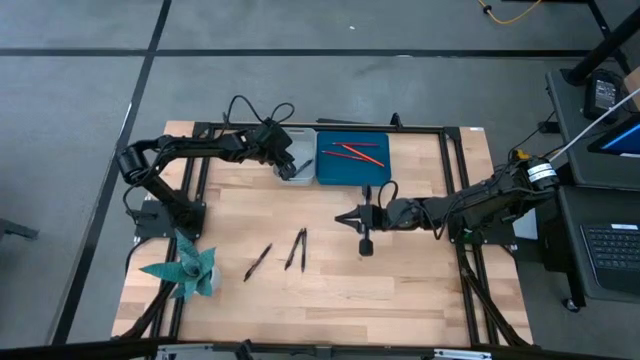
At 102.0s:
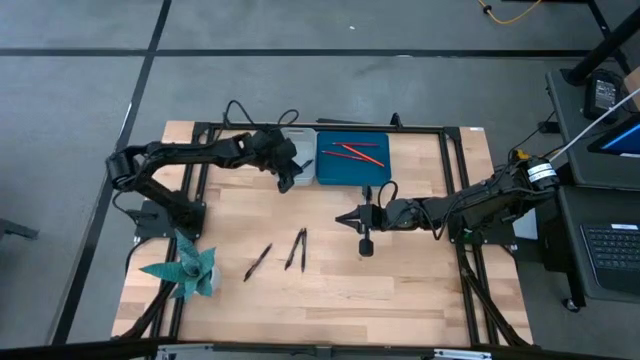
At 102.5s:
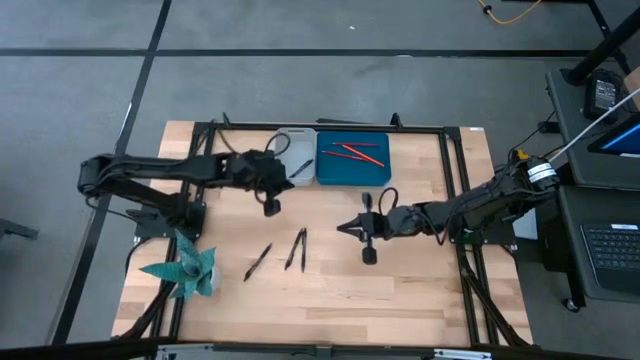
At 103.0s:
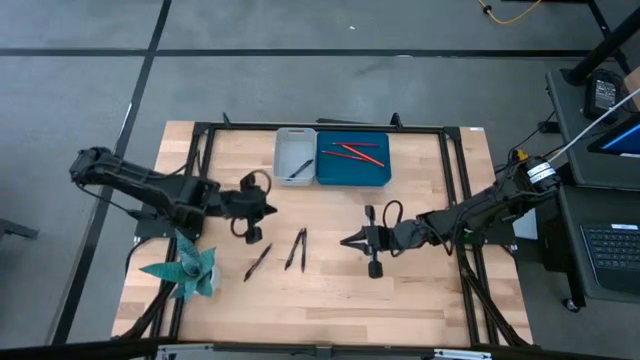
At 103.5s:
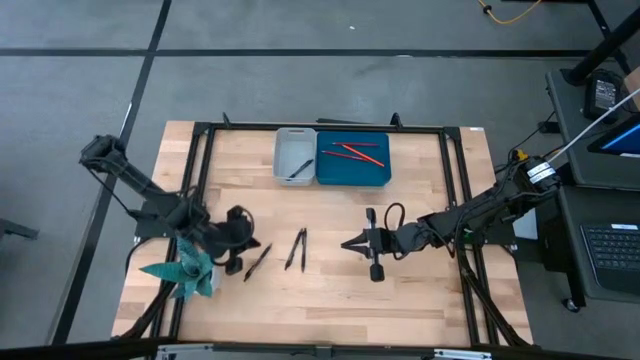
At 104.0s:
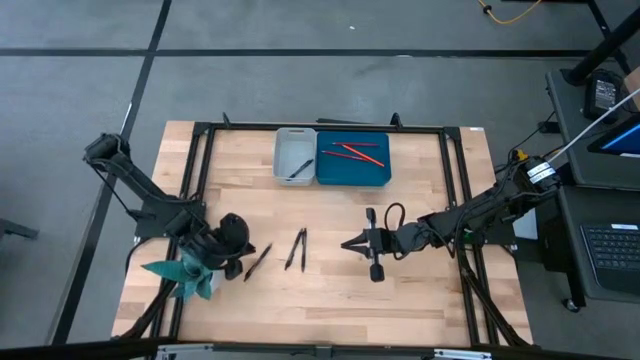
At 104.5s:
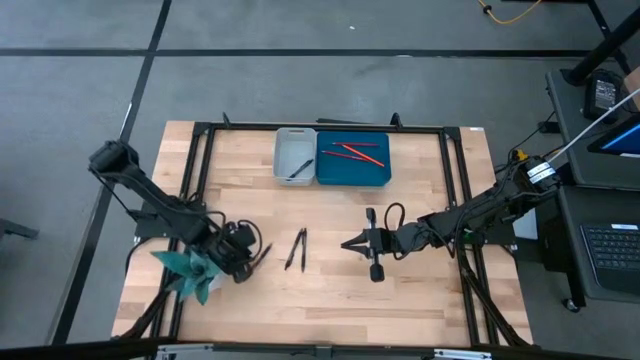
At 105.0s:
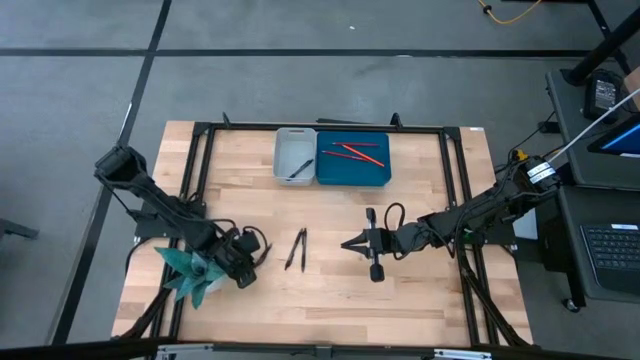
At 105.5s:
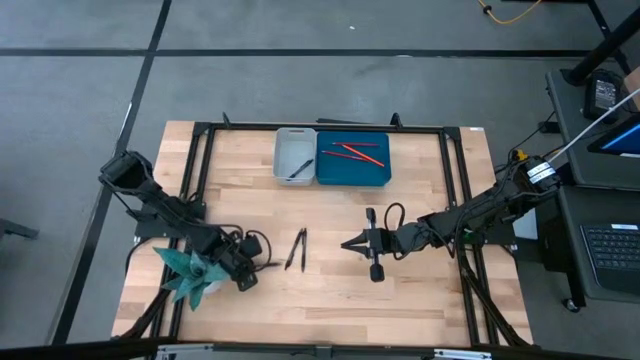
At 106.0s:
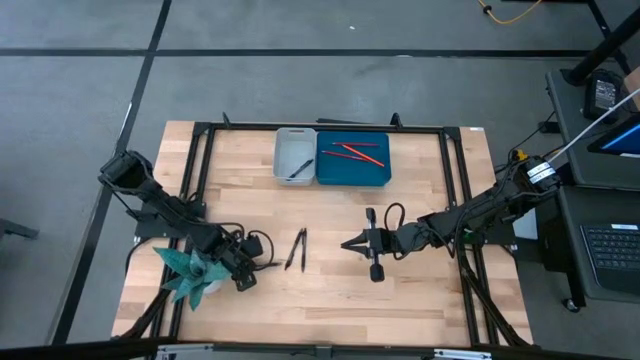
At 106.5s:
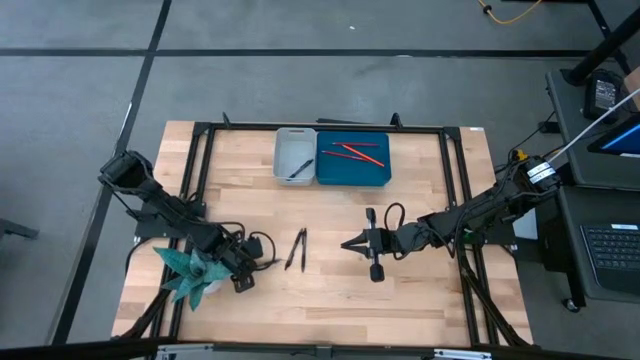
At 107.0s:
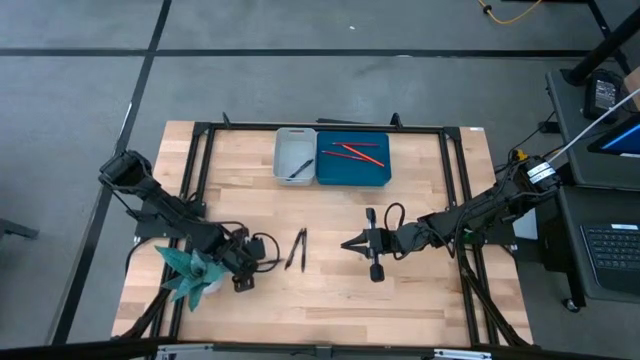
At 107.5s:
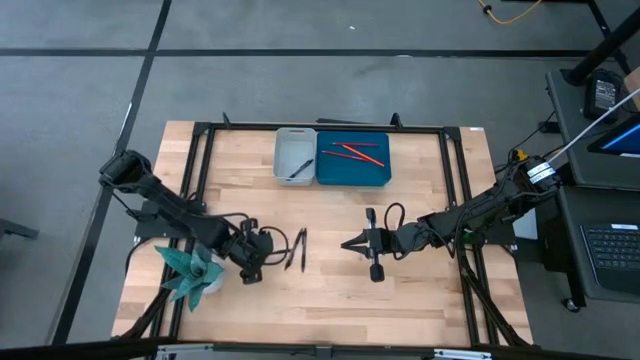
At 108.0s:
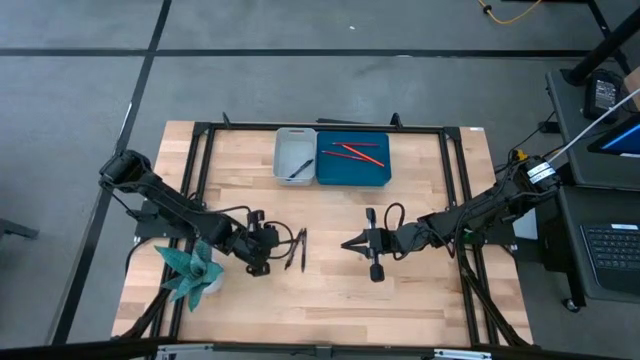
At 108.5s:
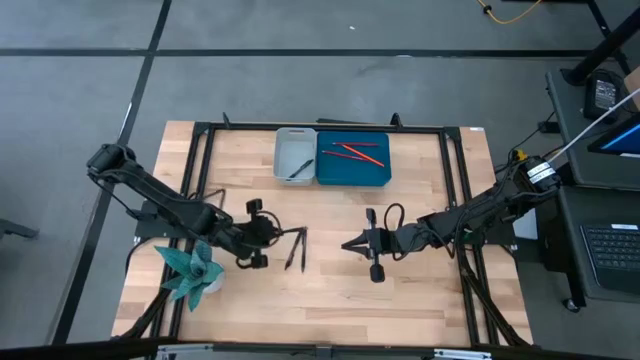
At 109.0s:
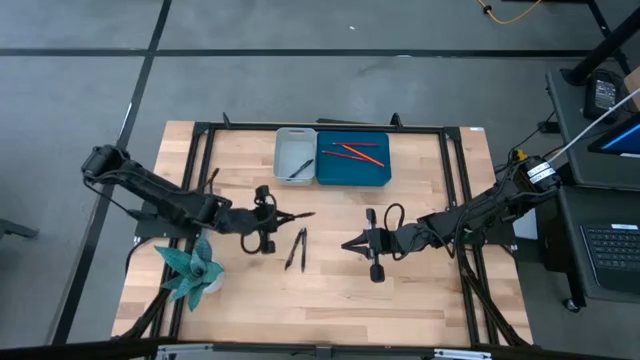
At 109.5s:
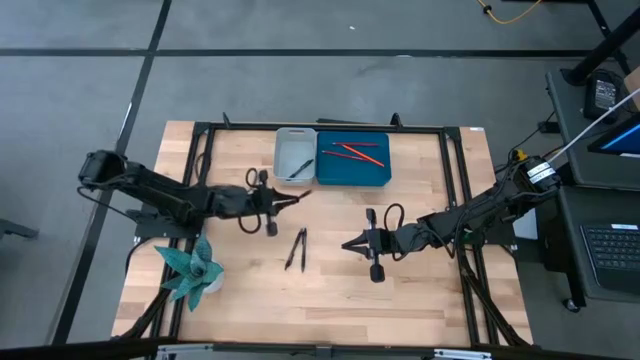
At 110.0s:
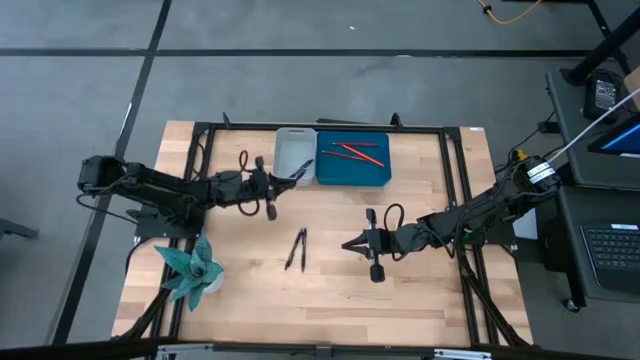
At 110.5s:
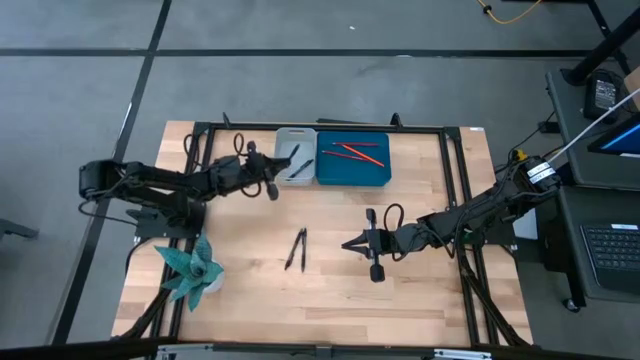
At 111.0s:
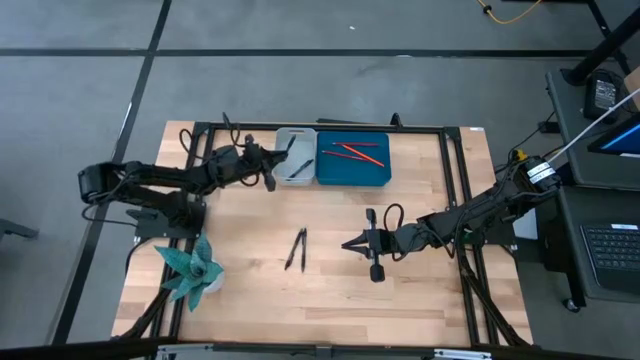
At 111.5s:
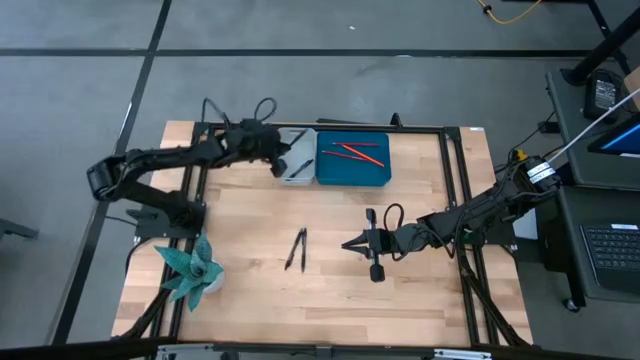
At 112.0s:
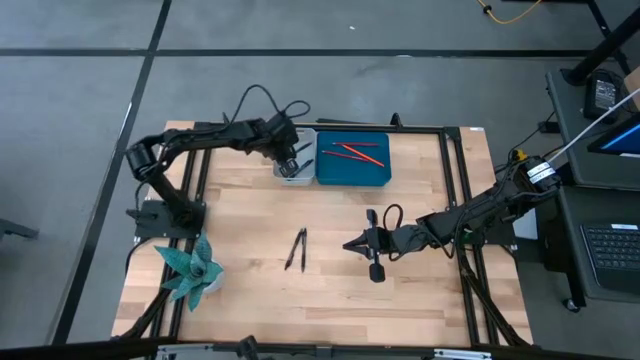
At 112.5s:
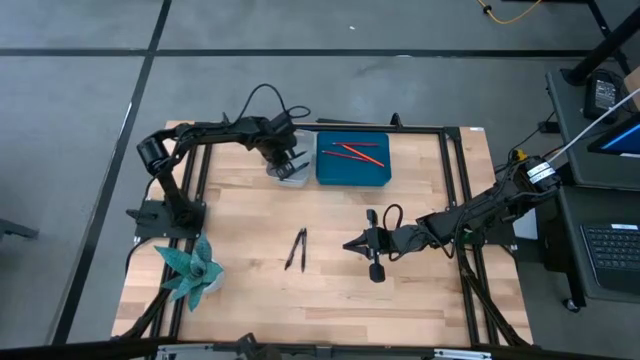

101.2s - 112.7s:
Task: Sort pens & pencils
Put the black pen into the gray bin

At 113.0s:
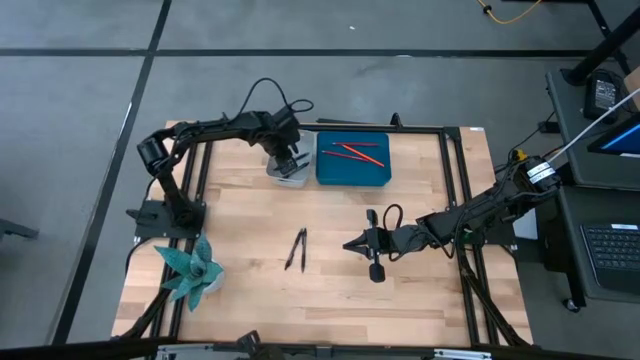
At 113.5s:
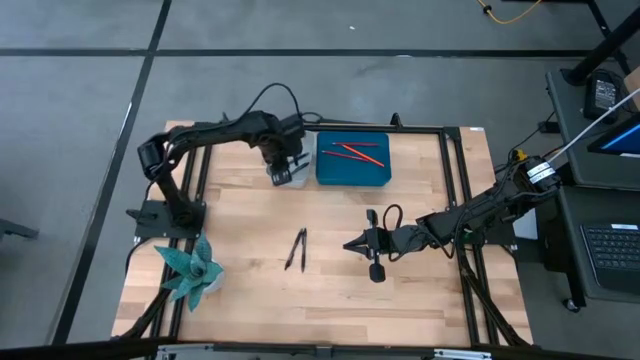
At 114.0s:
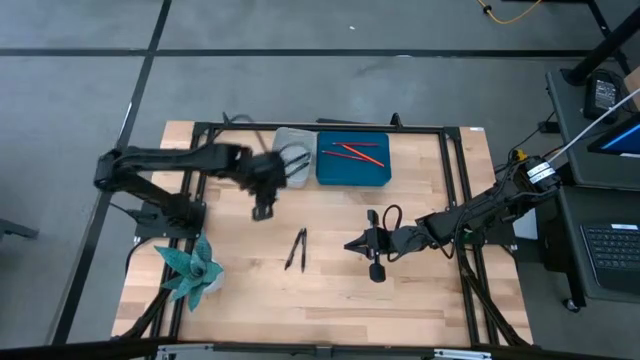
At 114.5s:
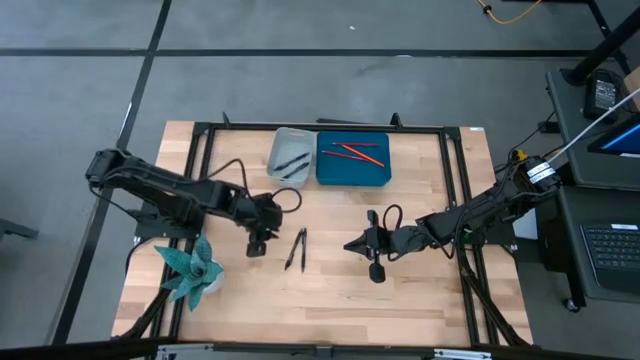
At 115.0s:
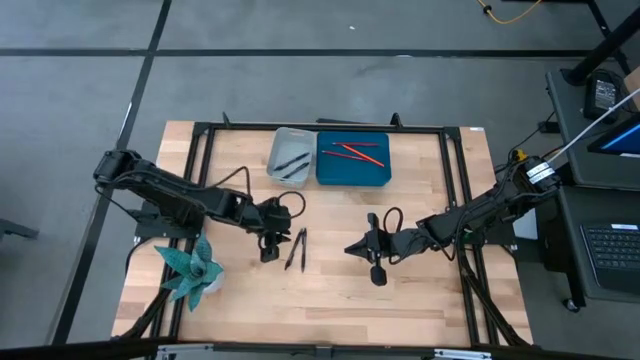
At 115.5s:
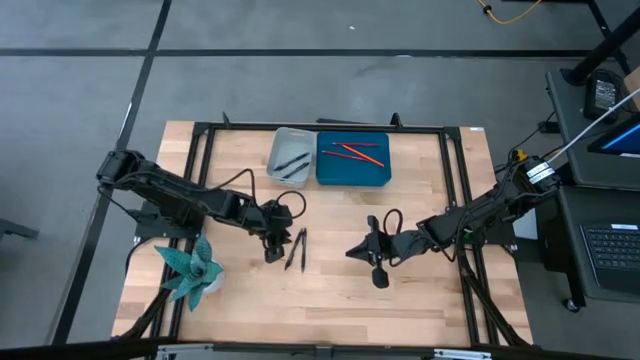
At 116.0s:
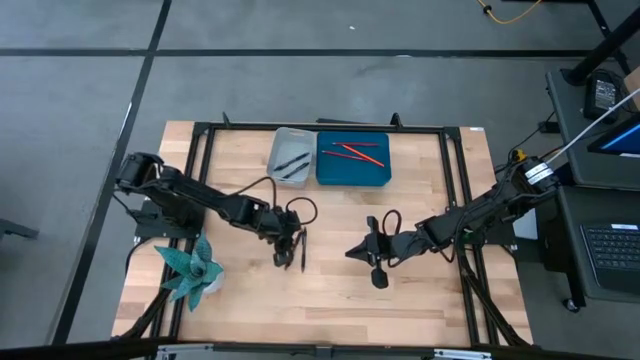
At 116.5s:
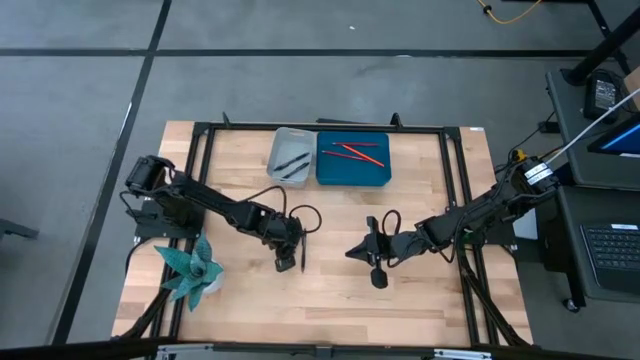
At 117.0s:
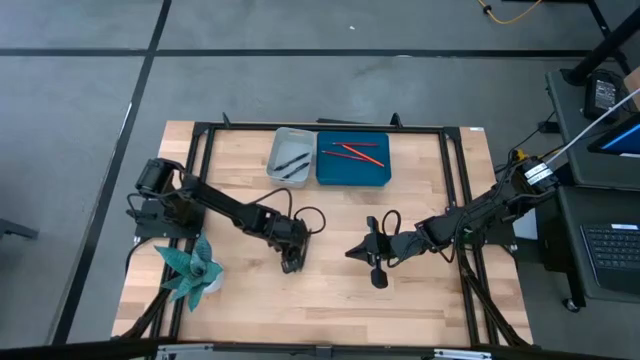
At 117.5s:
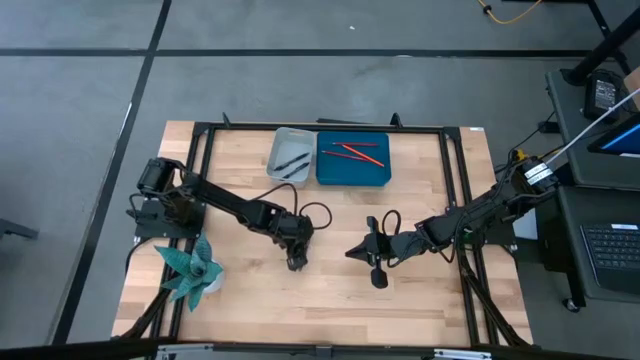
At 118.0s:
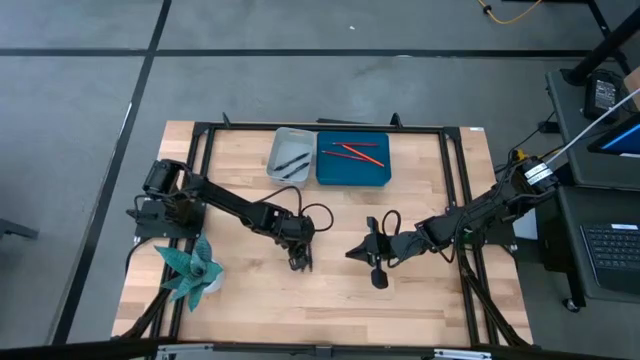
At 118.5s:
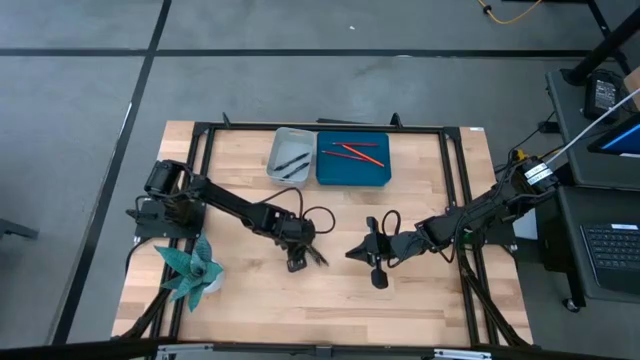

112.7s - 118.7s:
Put the black pen into the gray bin

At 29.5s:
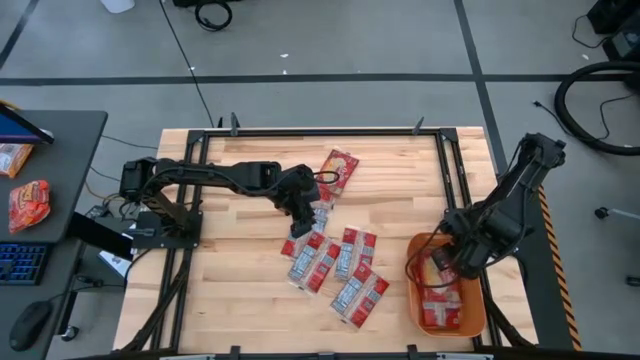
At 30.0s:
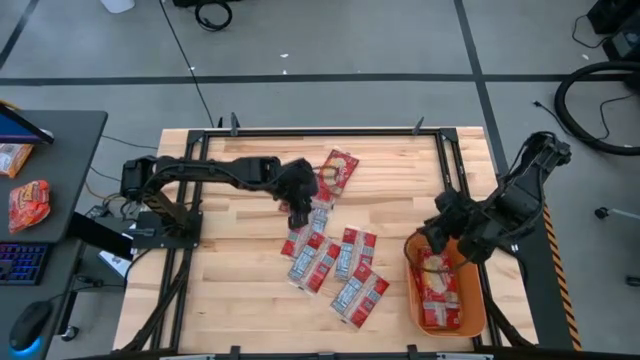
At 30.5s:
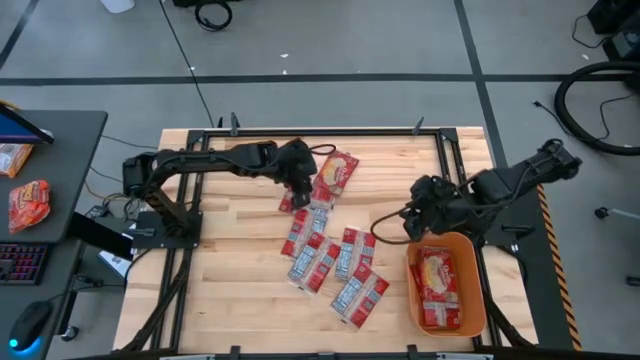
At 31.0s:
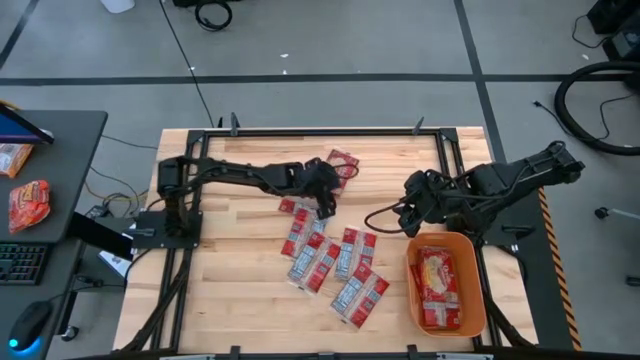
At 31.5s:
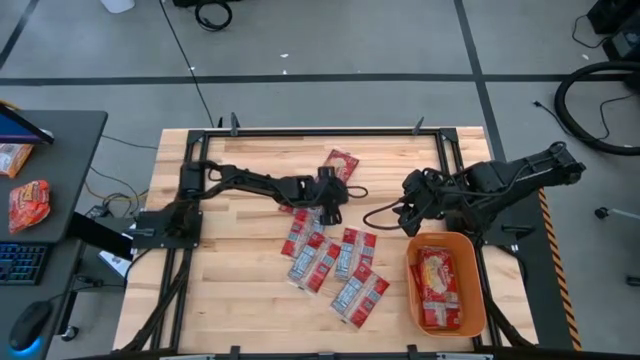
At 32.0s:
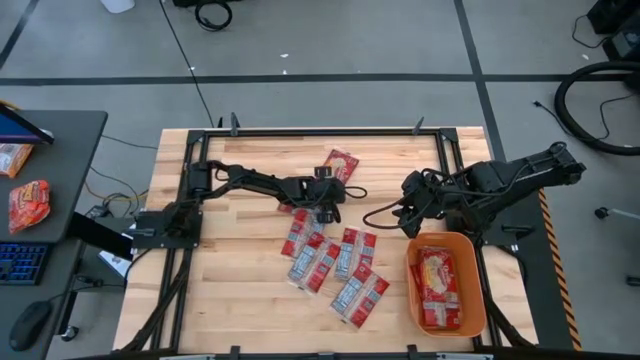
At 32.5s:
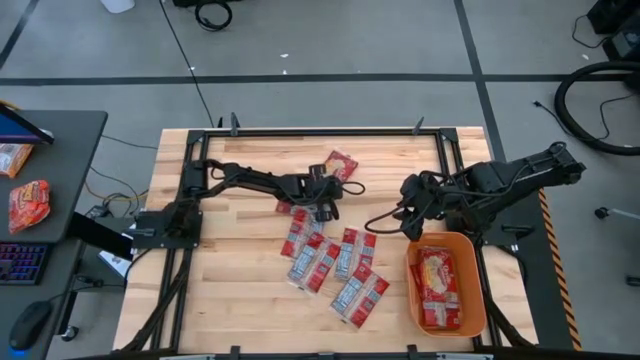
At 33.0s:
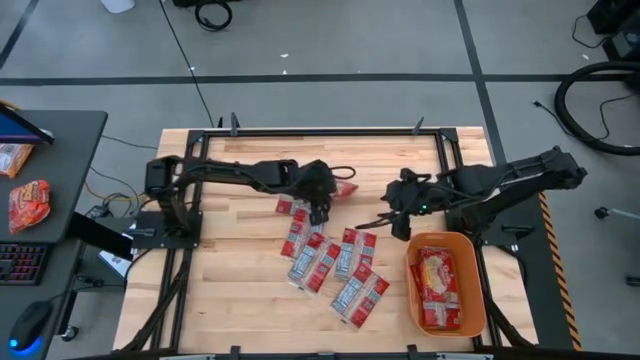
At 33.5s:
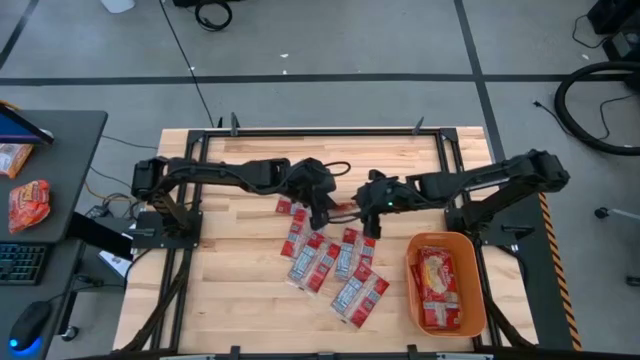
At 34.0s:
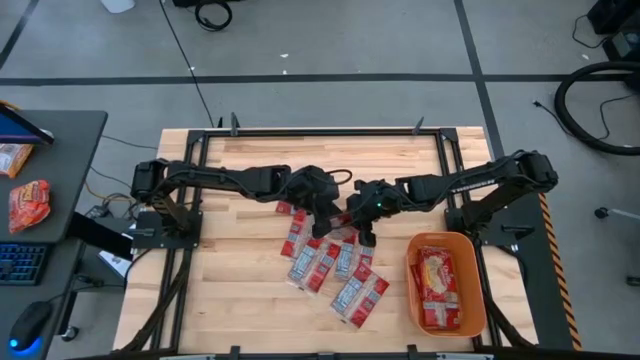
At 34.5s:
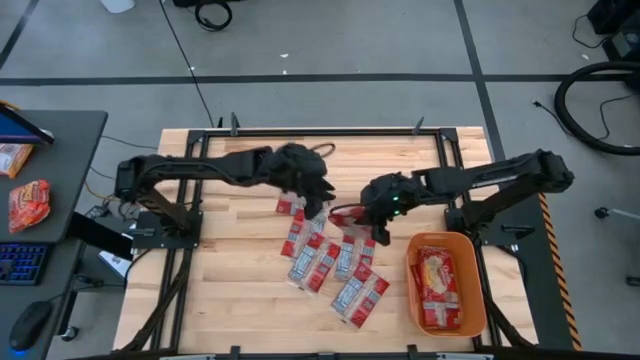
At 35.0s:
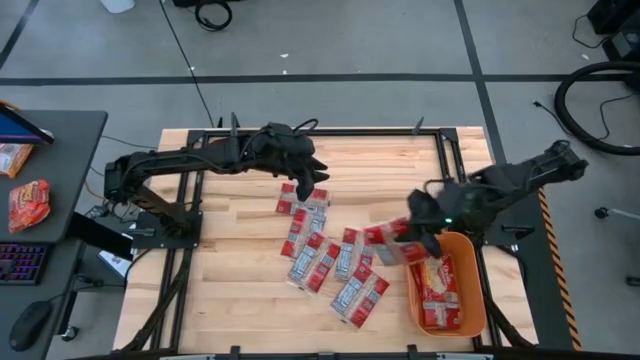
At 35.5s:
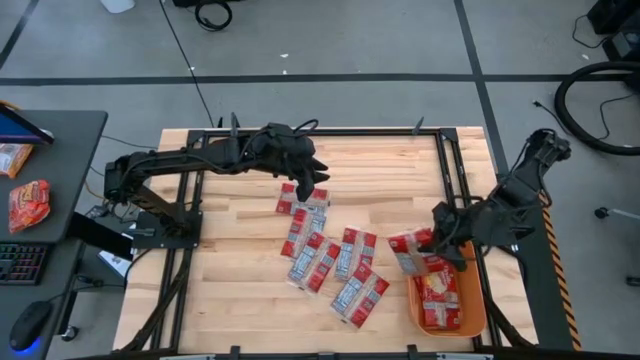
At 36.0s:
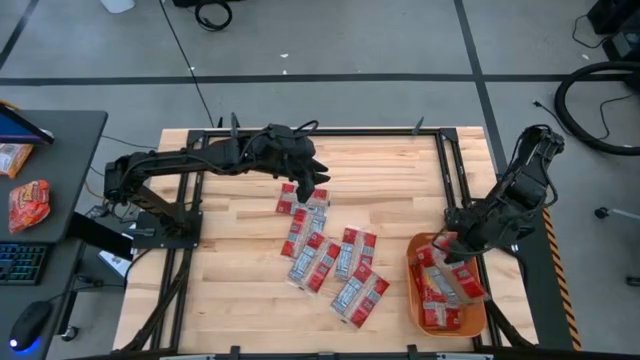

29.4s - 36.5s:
Task: Sort popcorn bags into baskets
Put the red popcorn bag into the orange bin
